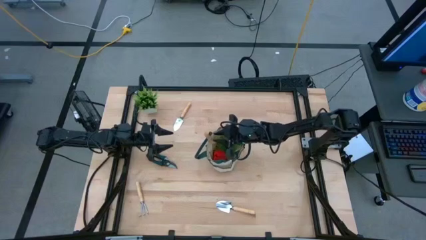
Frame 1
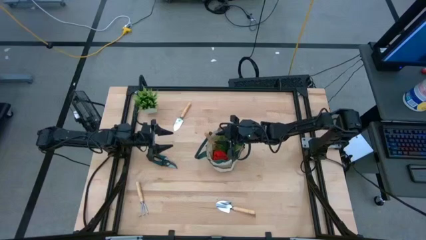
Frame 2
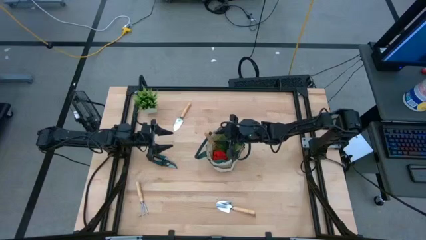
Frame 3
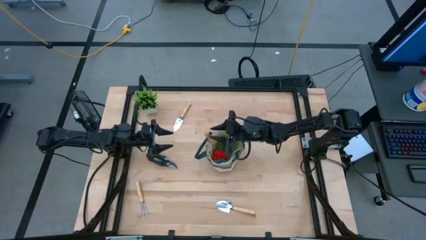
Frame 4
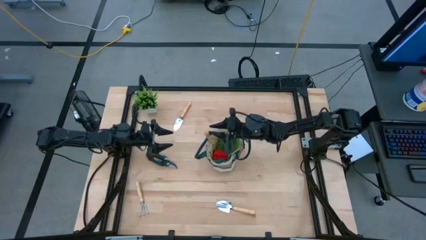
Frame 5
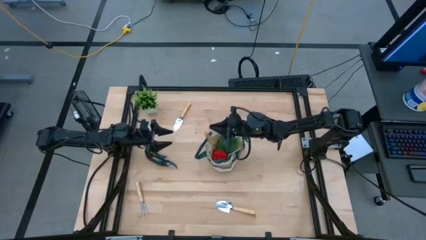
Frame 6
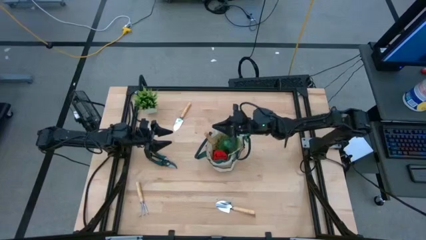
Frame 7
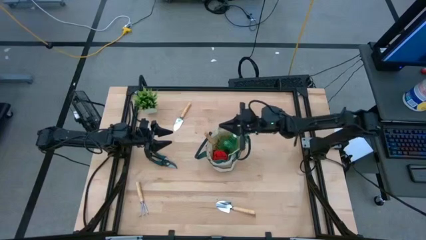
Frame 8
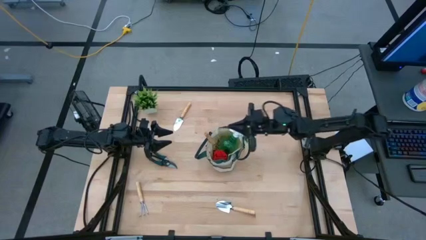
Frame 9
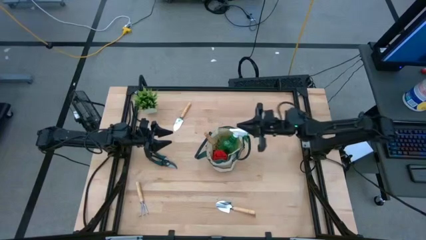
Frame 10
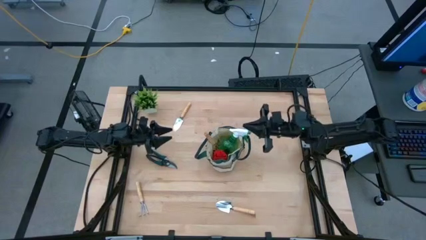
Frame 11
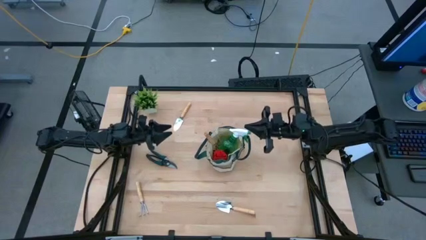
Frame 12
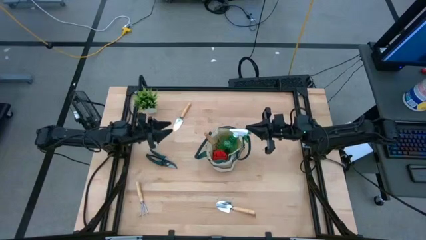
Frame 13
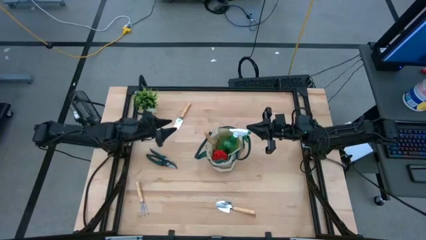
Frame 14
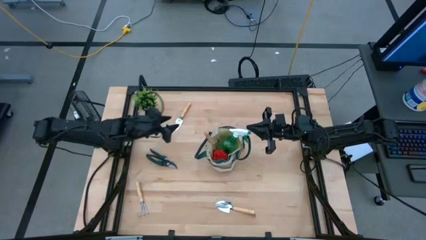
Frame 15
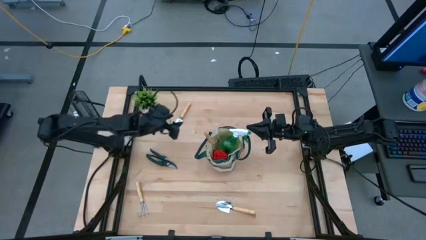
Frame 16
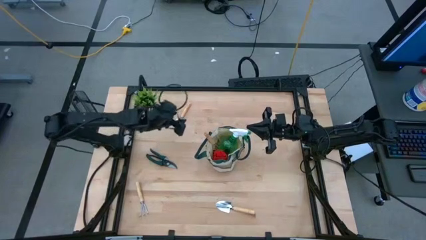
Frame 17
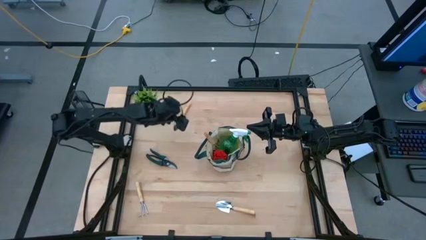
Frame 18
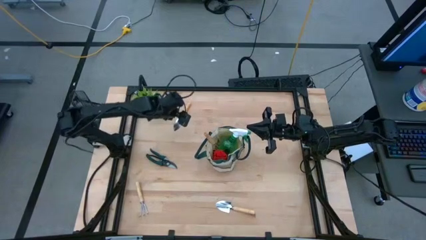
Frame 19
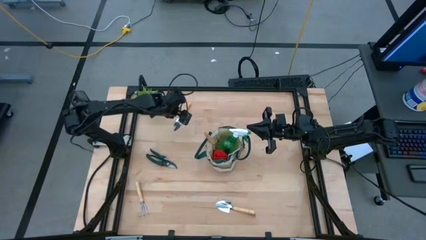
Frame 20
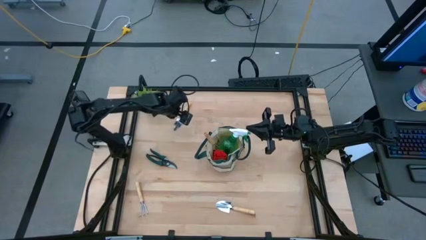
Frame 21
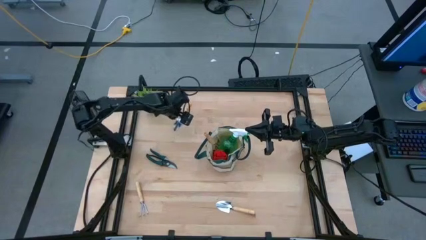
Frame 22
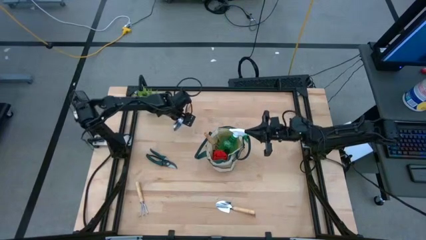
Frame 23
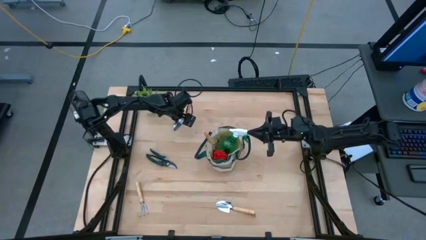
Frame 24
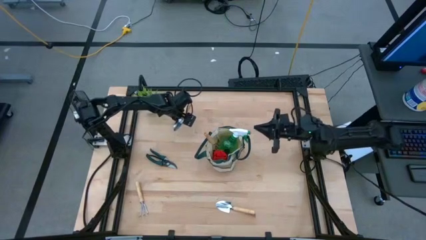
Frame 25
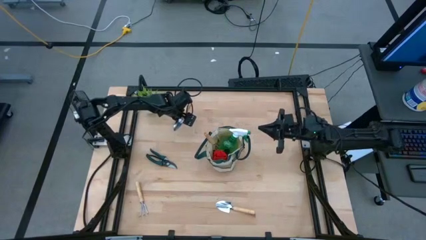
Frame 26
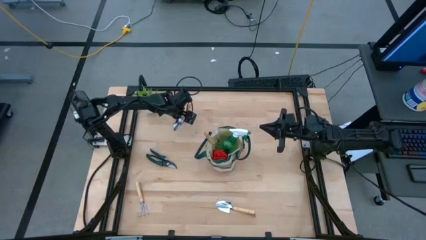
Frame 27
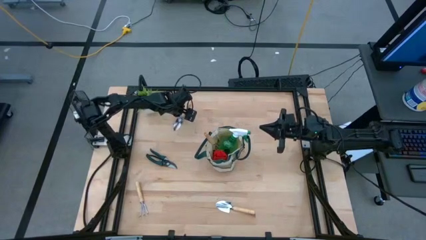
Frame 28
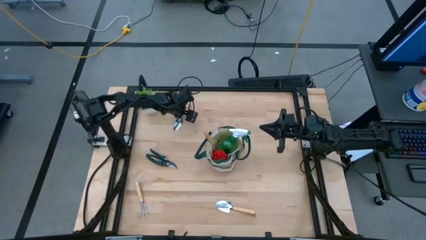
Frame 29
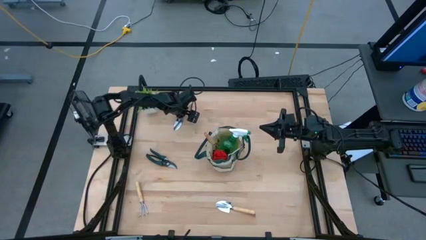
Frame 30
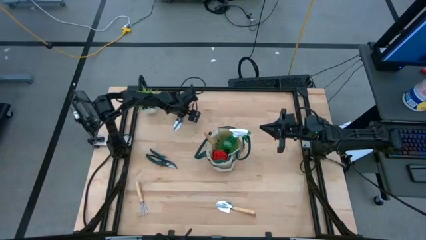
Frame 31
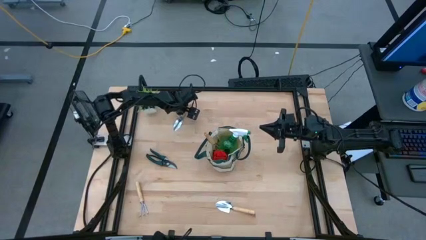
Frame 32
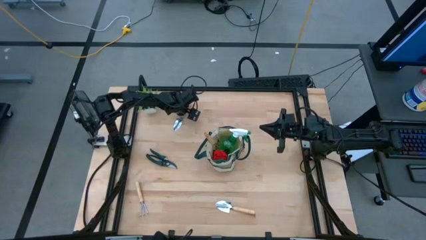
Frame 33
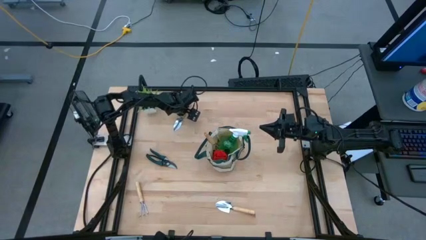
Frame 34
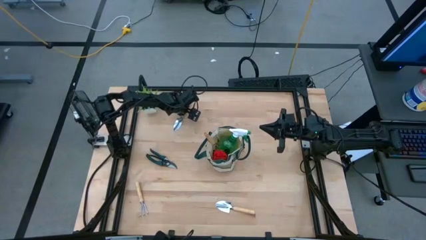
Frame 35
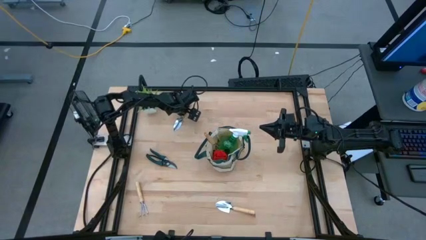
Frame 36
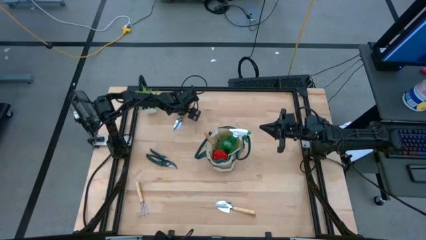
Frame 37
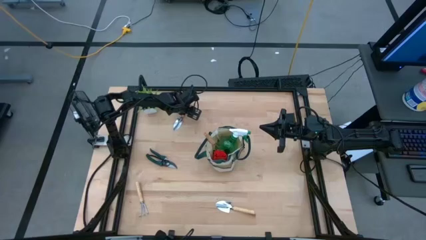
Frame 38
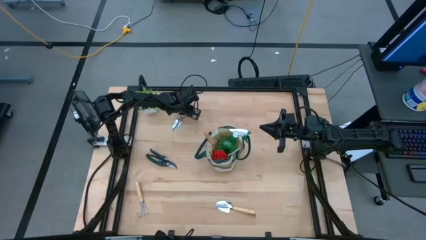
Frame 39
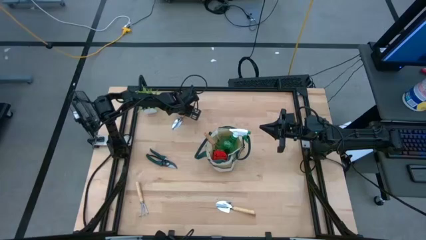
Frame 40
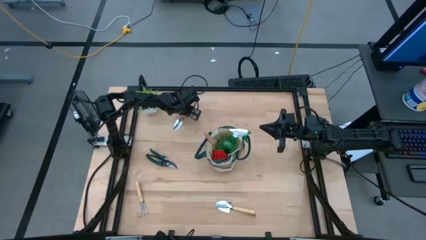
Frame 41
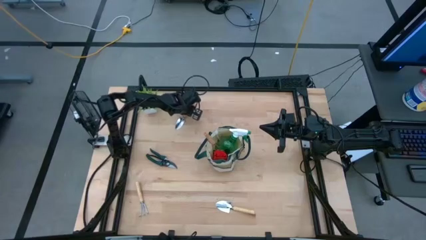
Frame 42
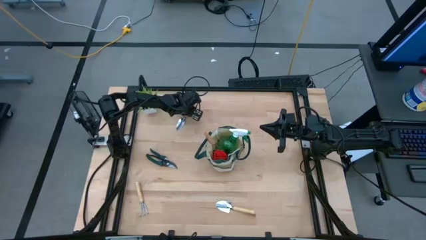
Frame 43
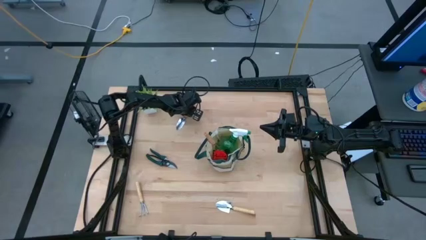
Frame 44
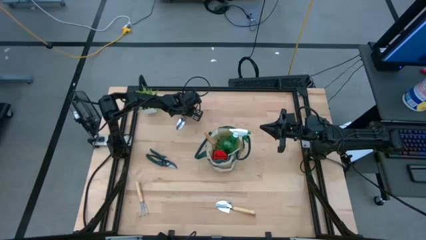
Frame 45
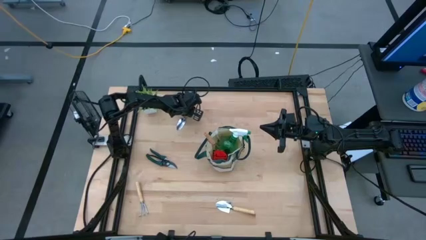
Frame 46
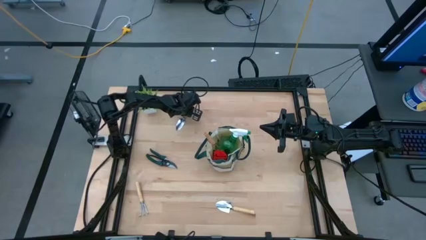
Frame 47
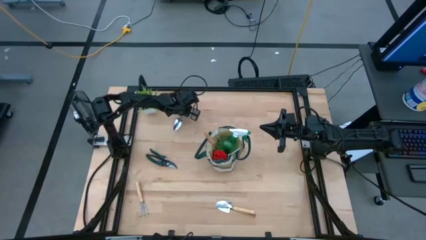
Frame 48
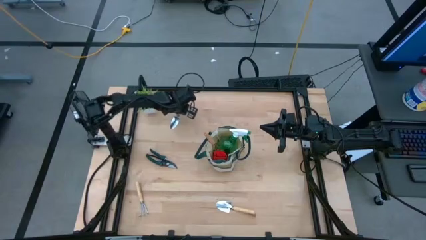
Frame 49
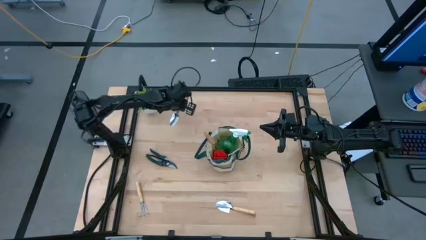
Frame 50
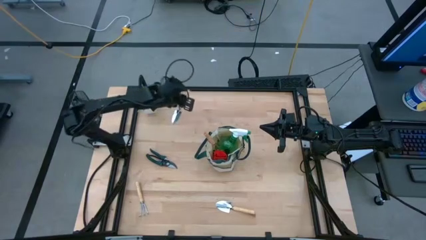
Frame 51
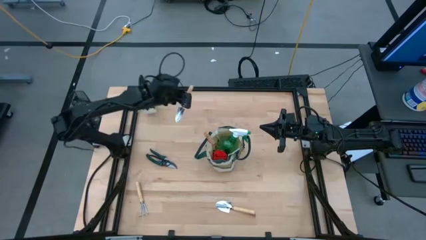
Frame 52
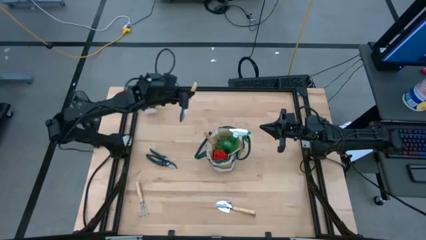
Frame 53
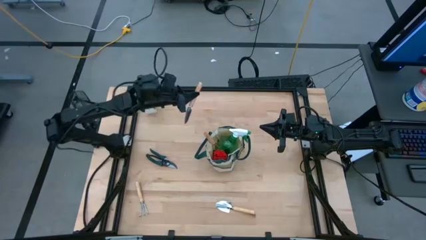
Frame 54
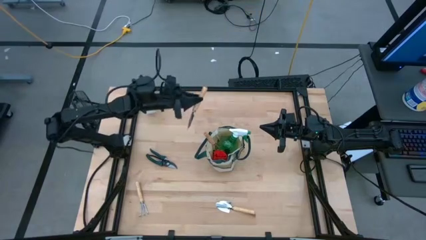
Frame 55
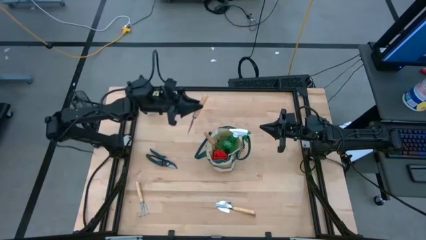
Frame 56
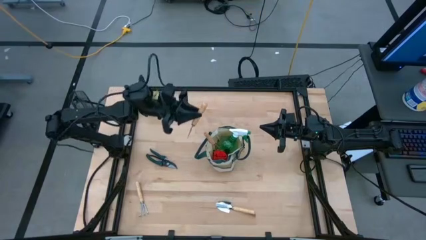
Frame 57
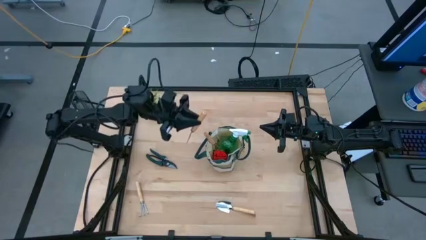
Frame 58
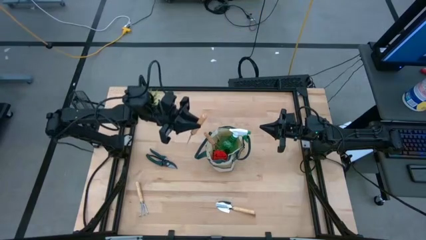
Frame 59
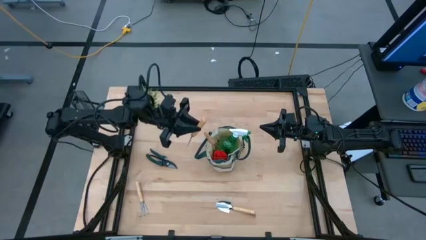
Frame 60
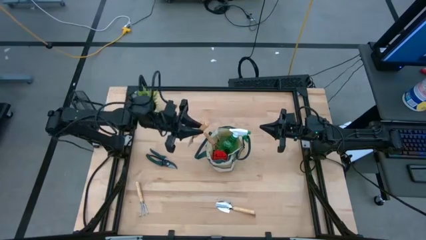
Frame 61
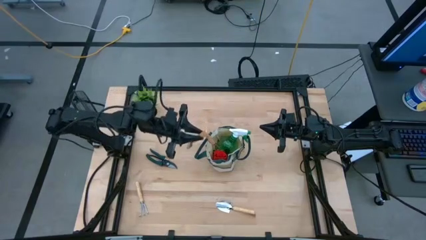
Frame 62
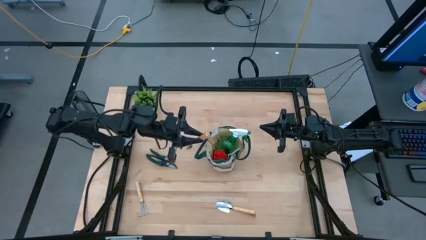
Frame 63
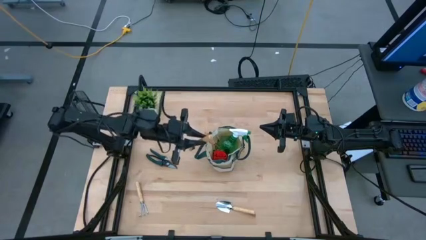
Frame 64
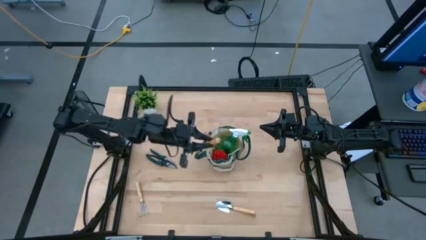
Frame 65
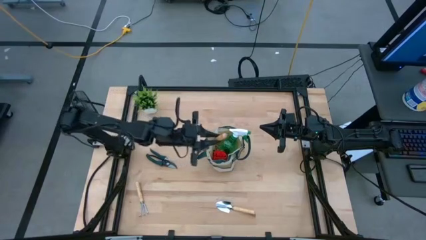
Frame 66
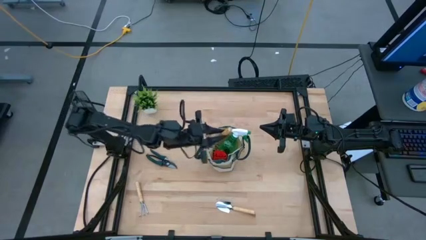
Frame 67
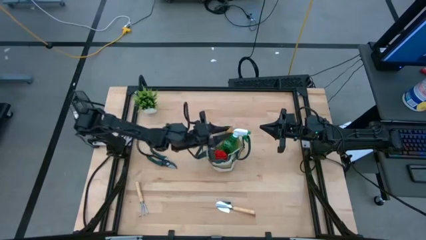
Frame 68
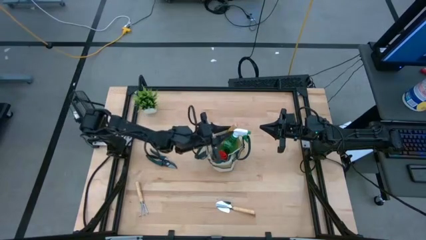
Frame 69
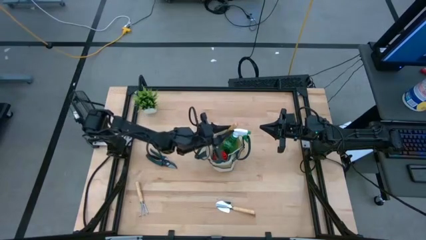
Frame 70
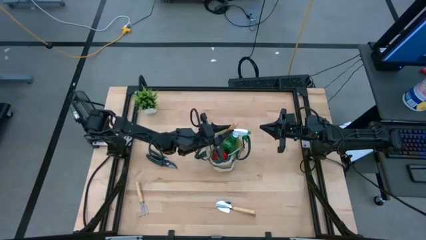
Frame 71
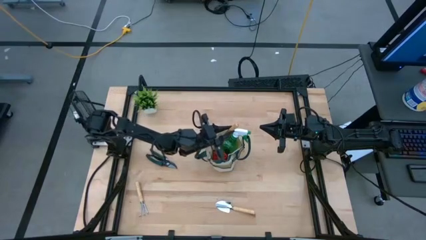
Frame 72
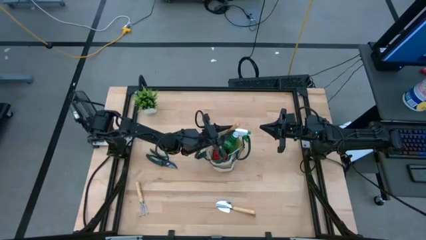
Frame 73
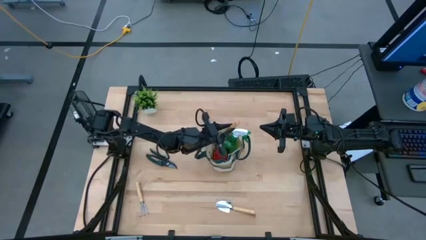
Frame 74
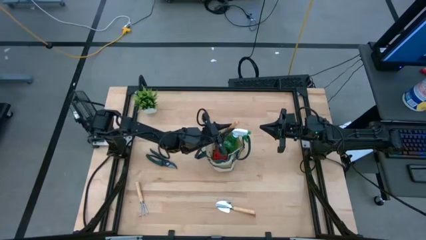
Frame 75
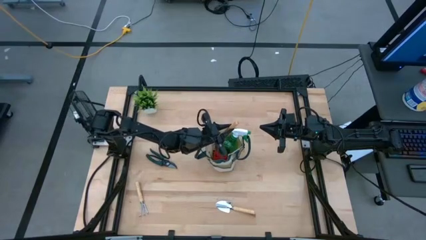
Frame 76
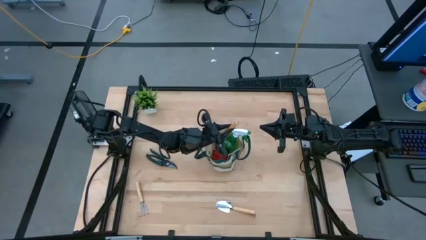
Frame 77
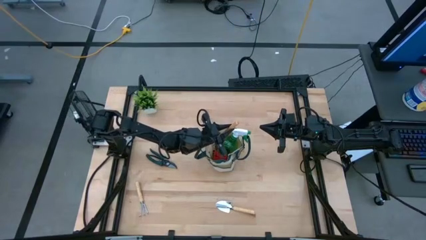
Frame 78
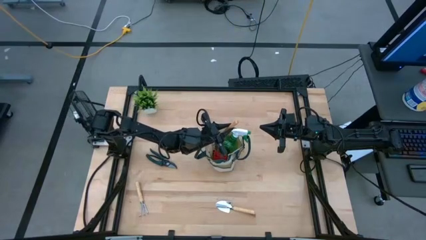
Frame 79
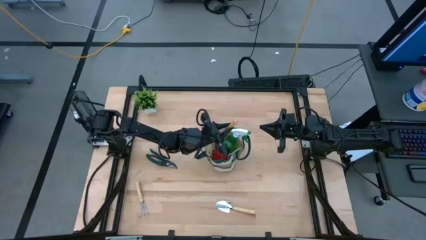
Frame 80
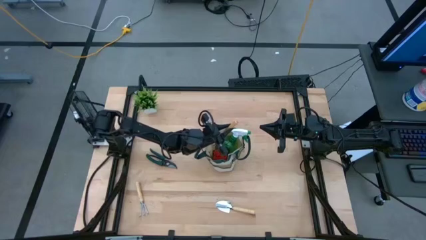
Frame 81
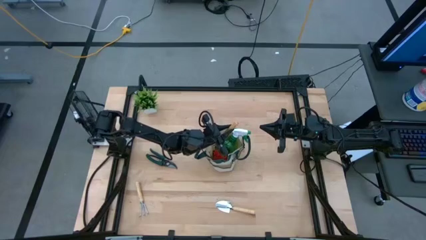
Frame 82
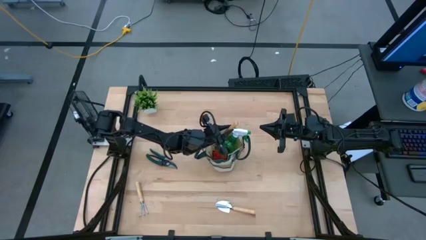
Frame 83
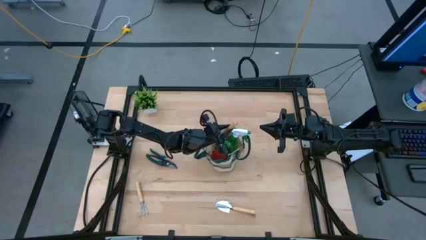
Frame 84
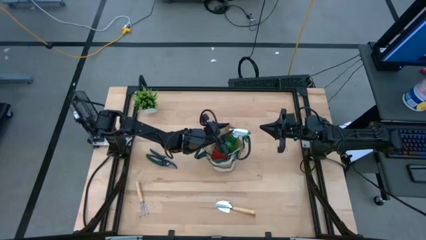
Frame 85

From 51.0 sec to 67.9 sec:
Task: Pick & Place Garden tools in Gardening bag
Put the top light brown trowel into the light brown gardening bag
